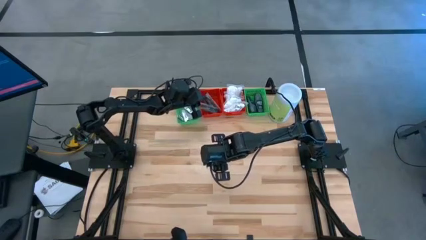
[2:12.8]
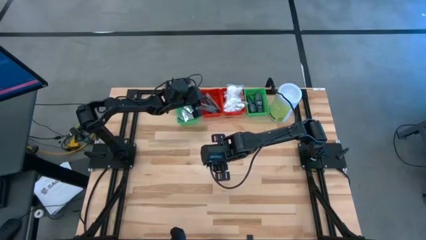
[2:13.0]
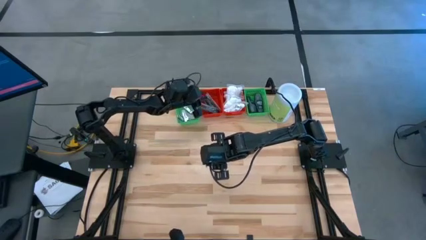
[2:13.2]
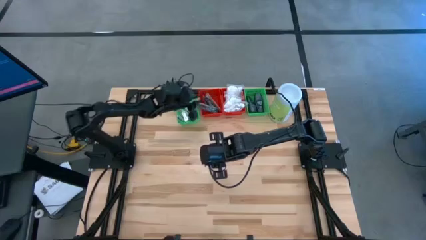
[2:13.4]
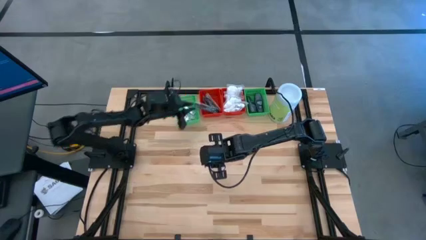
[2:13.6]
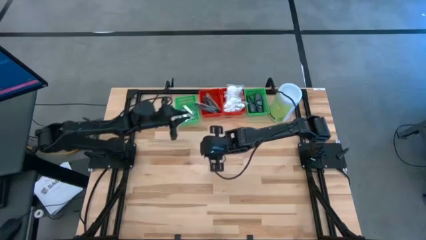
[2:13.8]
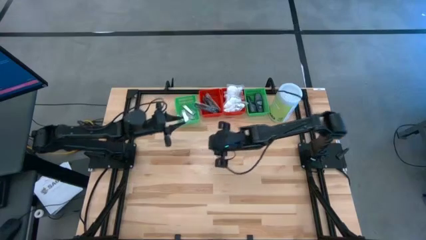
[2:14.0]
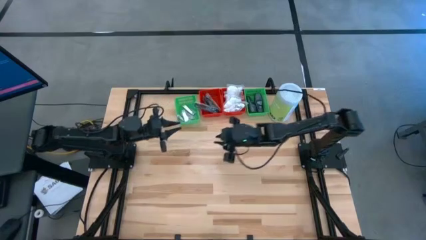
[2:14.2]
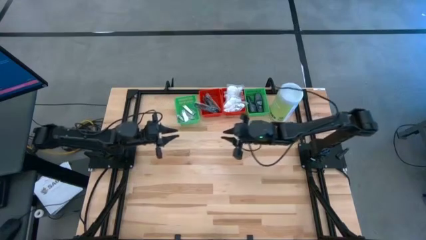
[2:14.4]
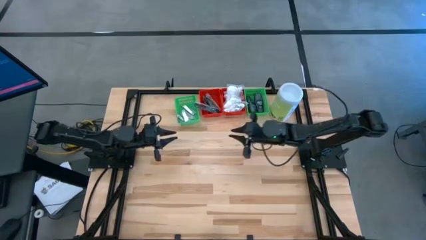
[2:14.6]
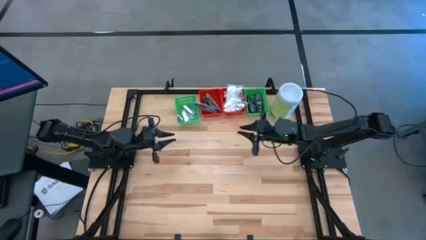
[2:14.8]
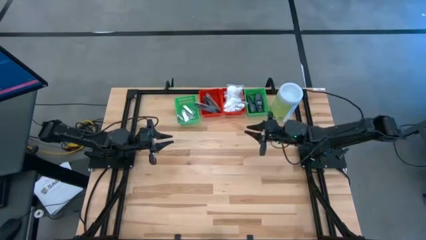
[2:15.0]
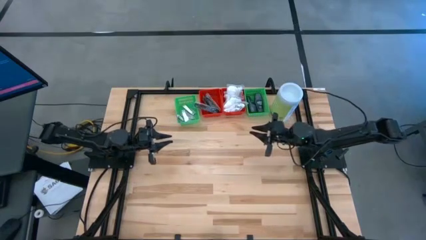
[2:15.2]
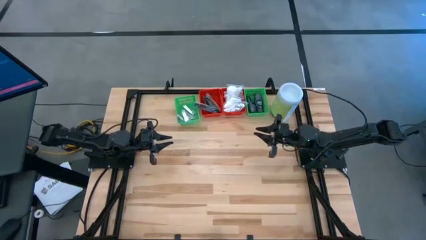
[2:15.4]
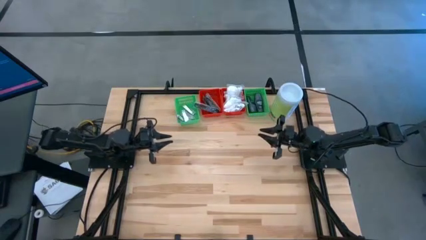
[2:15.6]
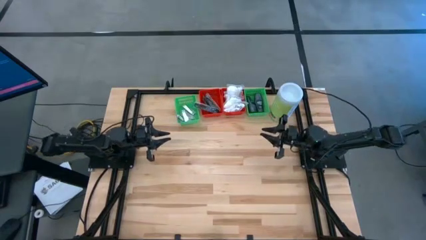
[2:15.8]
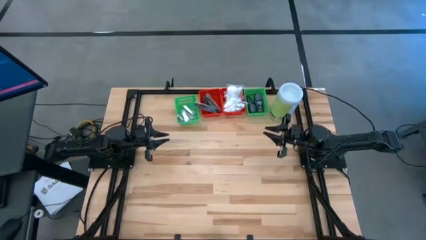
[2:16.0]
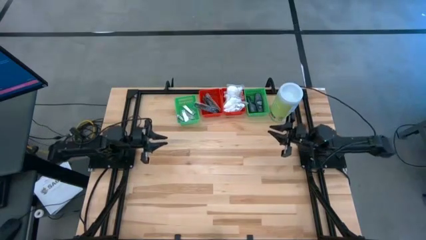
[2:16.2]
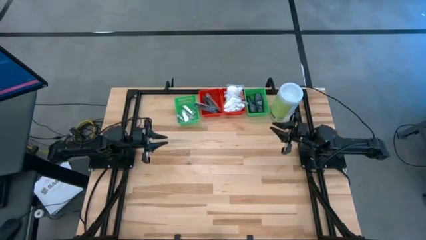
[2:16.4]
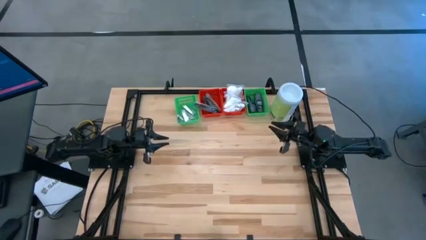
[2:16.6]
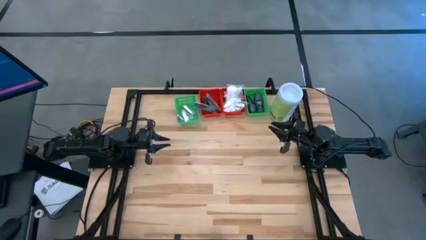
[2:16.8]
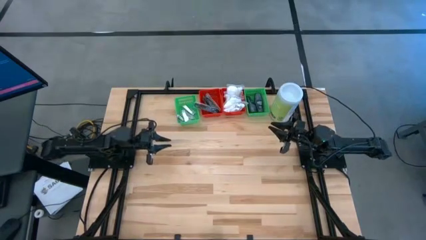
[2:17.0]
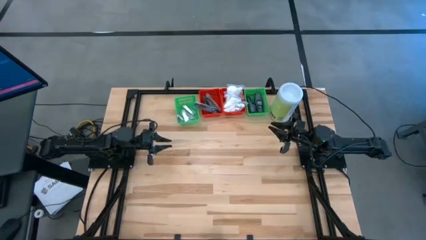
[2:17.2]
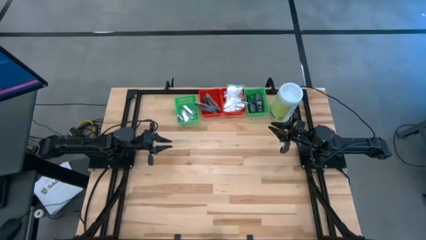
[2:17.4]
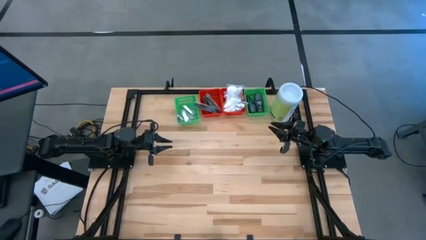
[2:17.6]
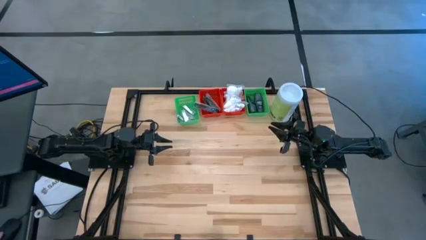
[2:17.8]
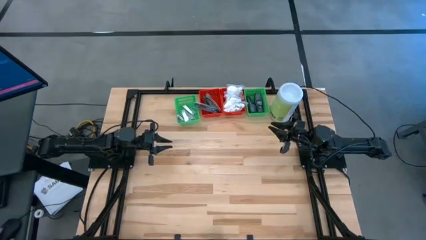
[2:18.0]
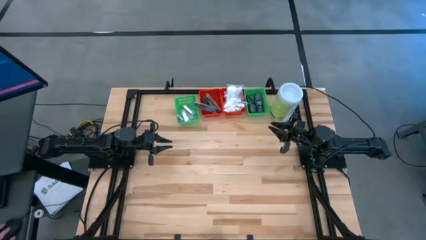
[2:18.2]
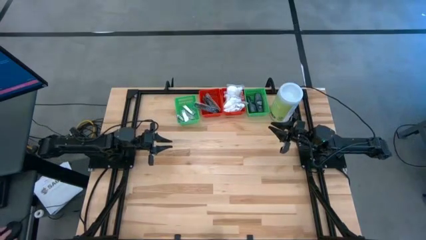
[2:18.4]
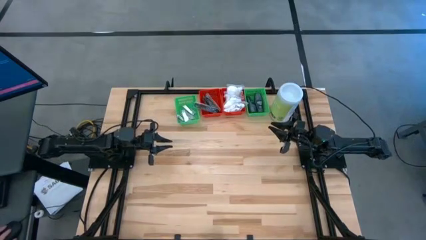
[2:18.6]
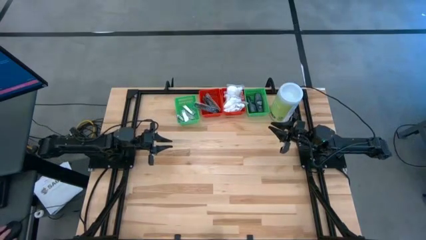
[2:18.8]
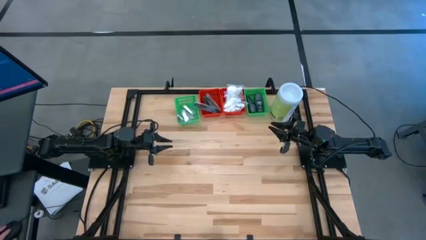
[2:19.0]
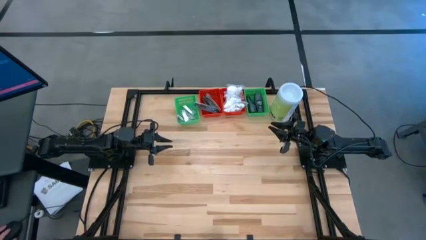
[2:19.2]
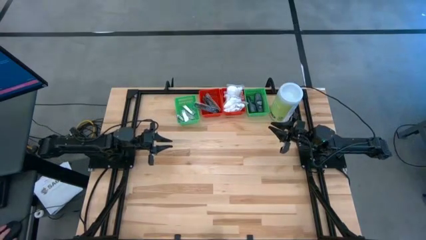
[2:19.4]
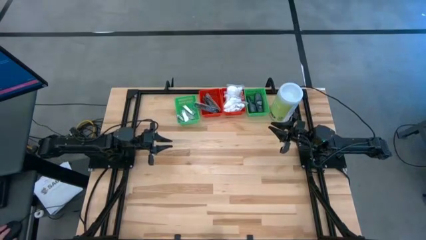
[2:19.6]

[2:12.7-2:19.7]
Task: Pick & Place Travel size toiletries
Return to Home Position

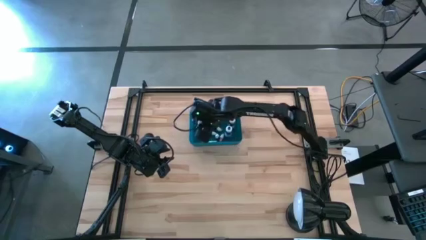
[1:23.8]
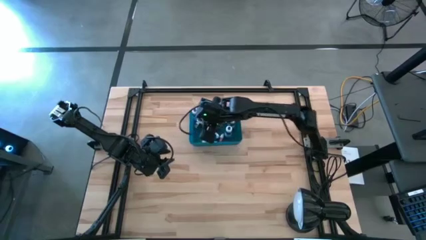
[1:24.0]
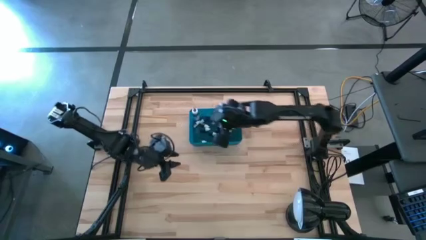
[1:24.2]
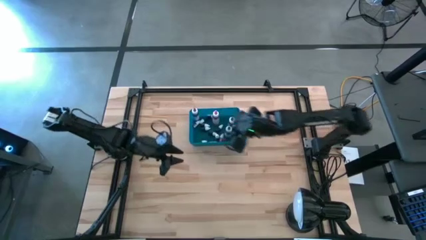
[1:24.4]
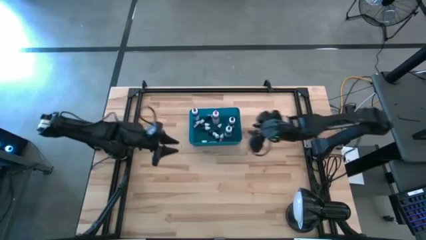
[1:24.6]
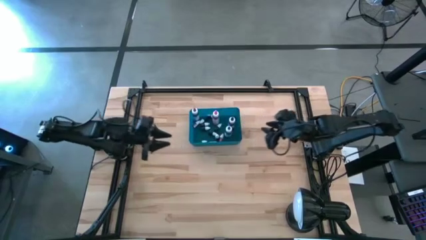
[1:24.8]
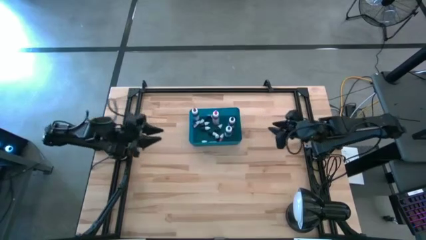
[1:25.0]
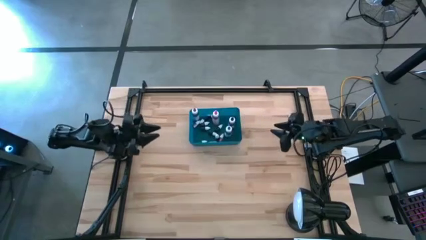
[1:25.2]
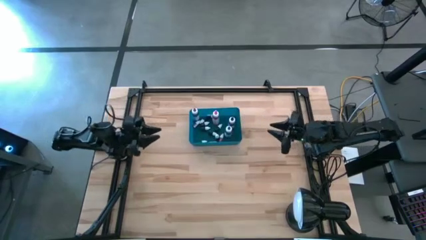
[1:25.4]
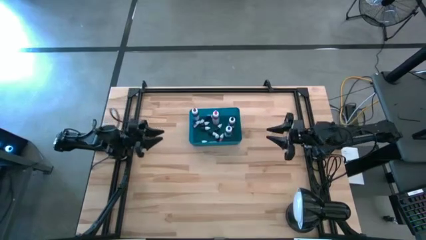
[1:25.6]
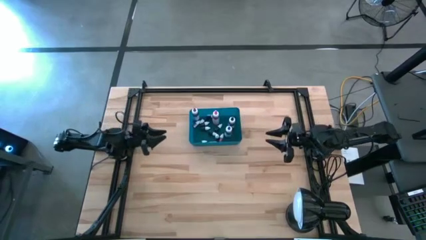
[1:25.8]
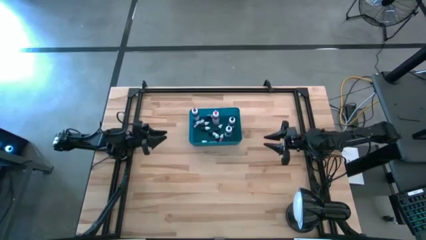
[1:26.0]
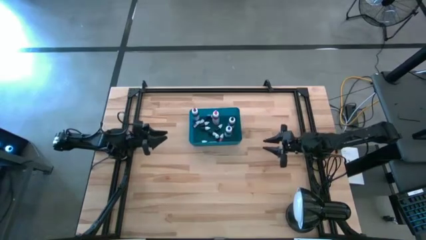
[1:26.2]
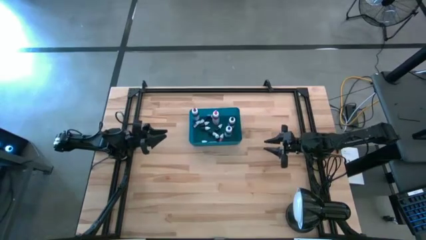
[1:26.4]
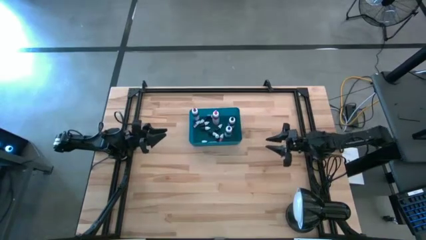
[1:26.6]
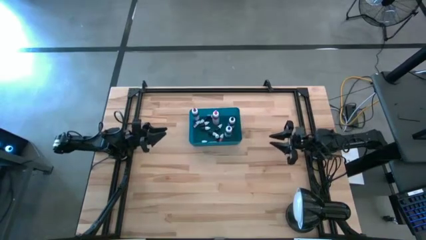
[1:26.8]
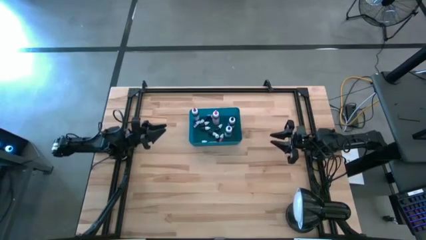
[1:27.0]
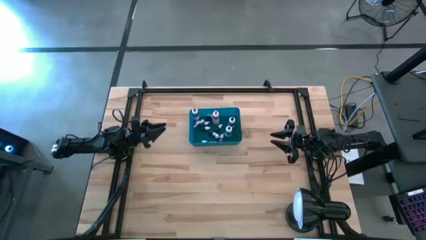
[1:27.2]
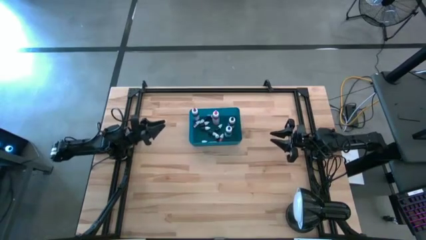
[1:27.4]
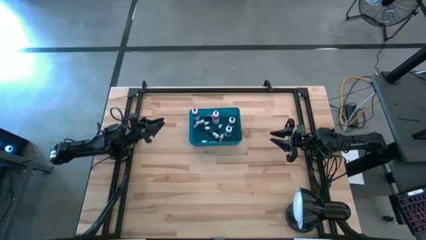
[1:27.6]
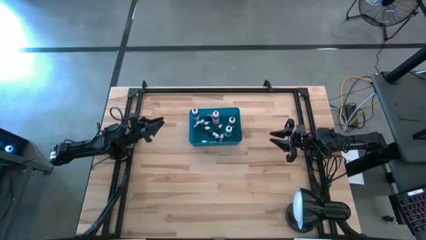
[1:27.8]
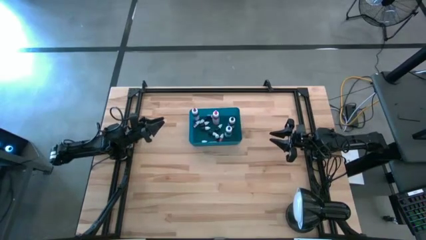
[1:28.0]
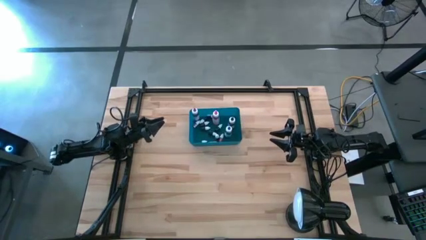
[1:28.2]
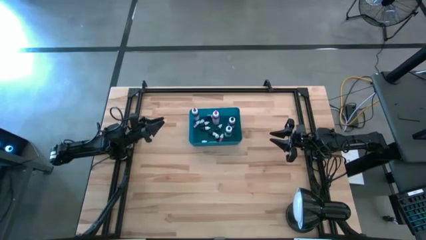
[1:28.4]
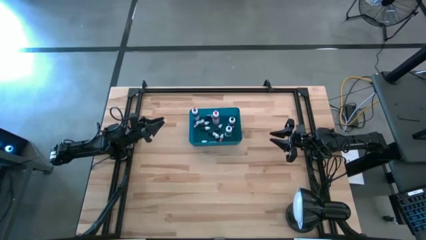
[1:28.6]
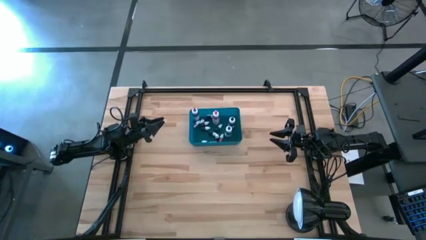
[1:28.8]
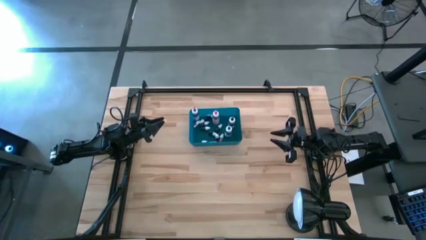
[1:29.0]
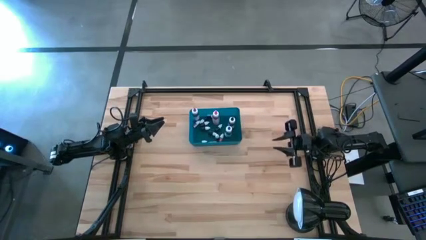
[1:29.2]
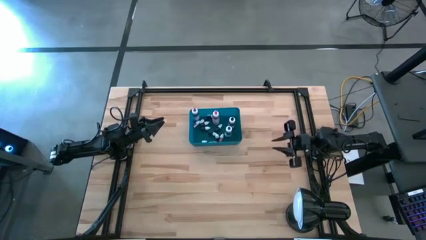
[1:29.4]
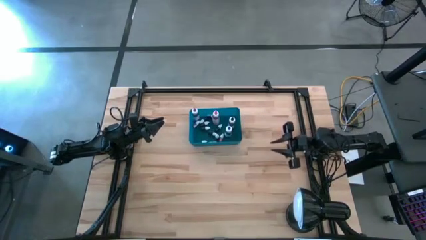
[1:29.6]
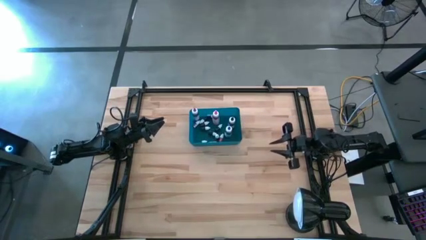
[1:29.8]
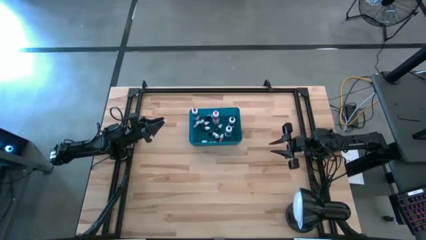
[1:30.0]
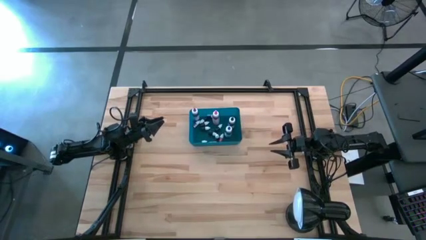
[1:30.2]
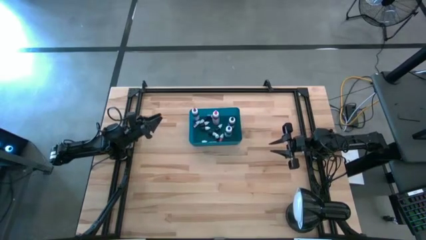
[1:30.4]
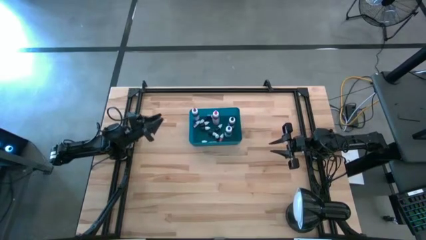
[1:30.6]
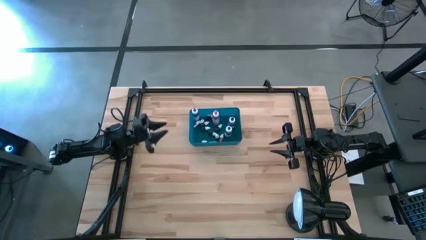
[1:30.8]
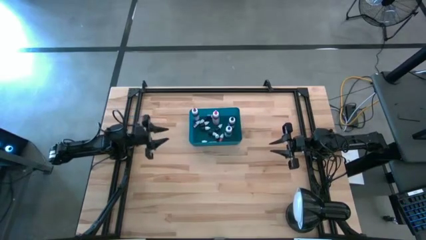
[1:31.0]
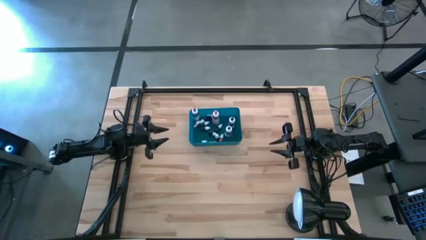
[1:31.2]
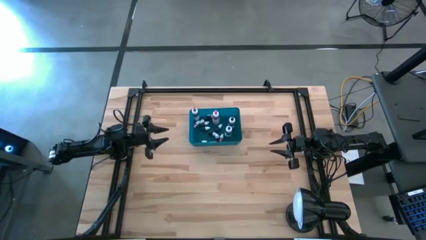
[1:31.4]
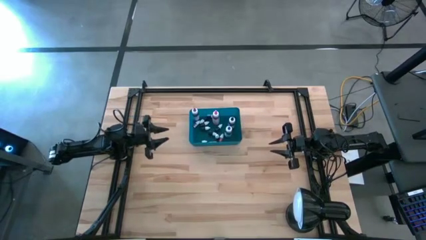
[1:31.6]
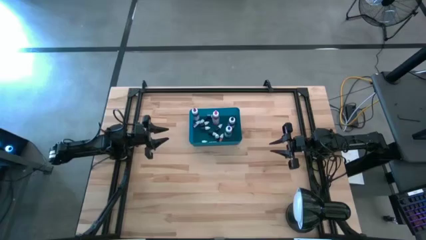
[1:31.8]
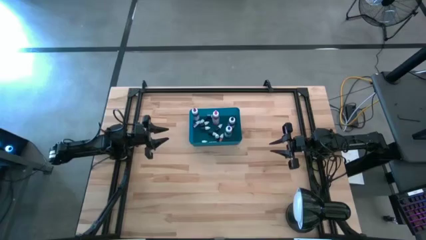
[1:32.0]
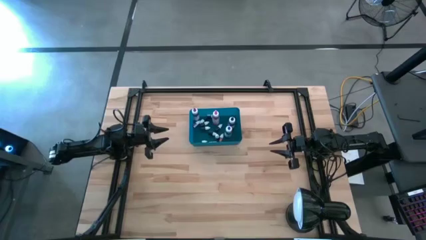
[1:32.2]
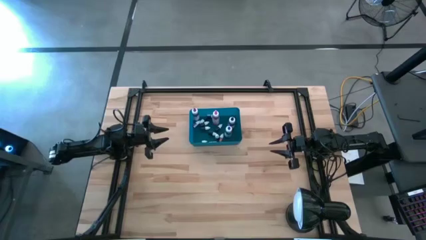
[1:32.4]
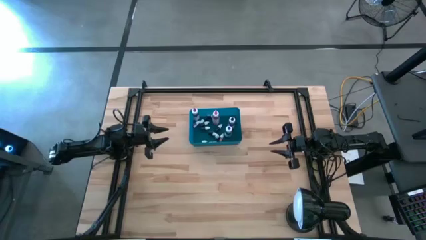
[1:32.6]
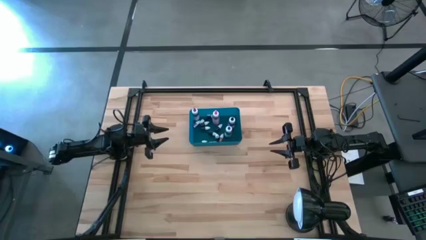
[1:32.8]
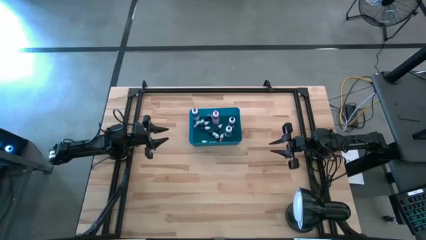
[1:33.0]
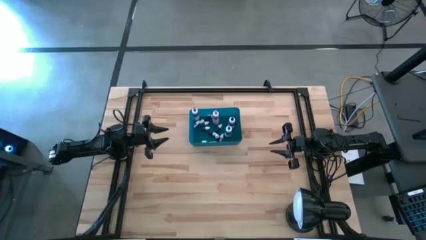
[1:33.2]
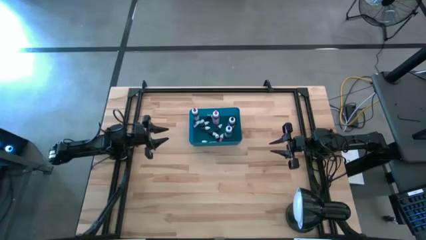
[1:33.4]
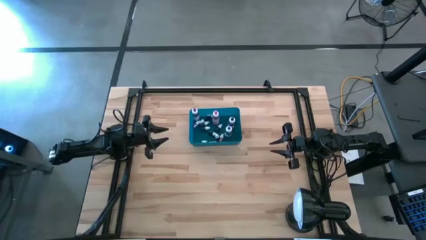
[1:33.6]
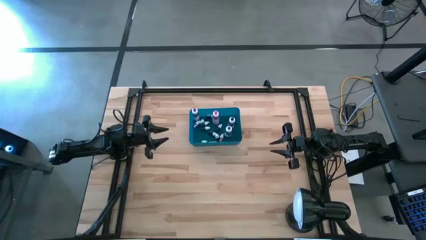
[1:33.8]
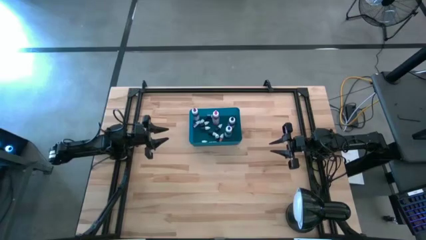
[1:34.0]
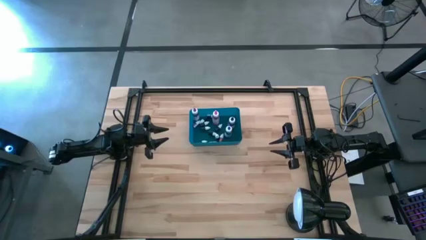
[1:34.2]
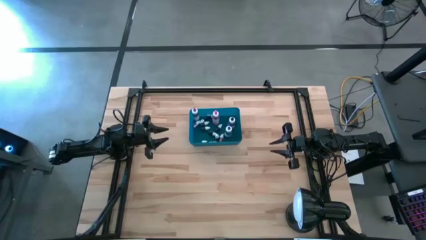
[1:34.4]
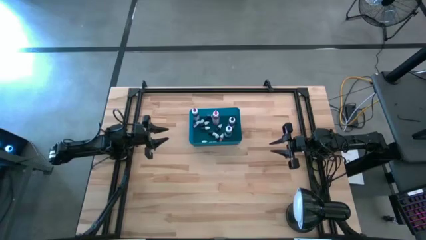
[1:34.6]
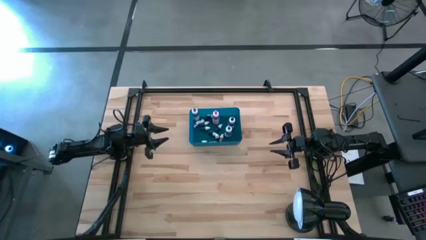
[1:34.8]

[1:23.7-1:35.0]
Task: Pick & Place food coloring
Return to Home Position
